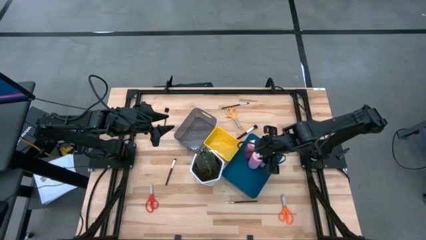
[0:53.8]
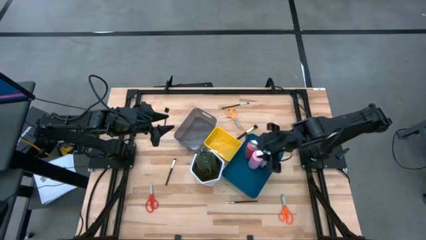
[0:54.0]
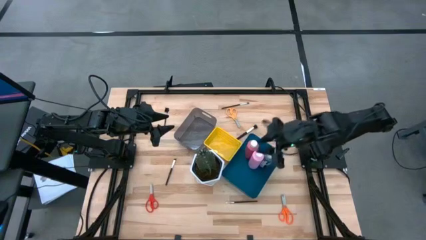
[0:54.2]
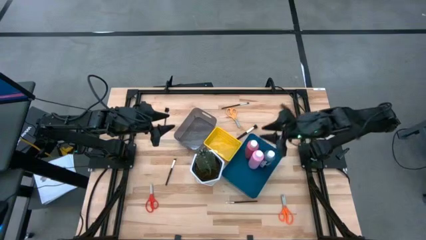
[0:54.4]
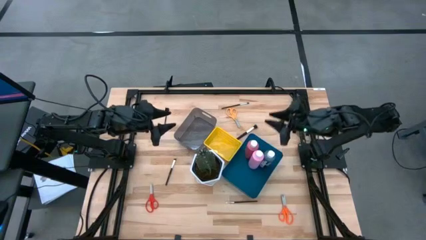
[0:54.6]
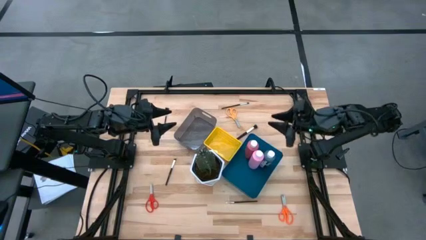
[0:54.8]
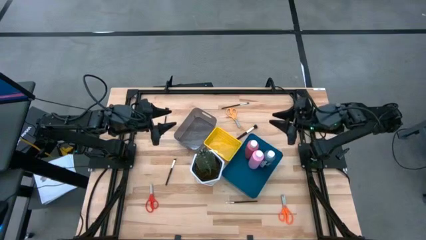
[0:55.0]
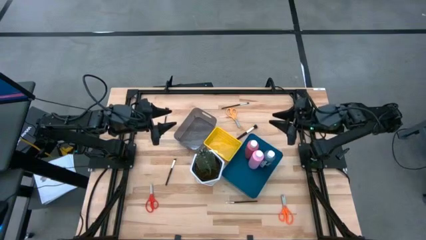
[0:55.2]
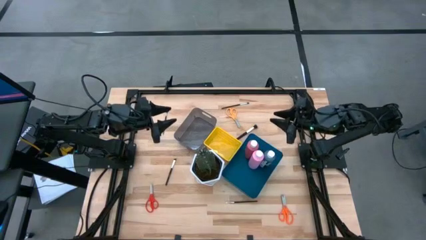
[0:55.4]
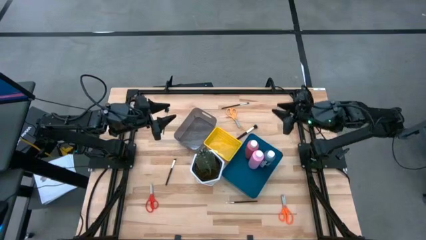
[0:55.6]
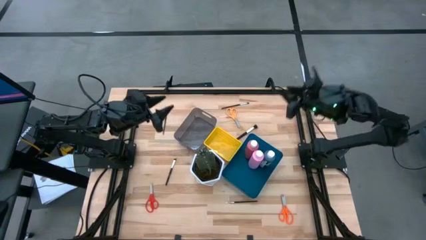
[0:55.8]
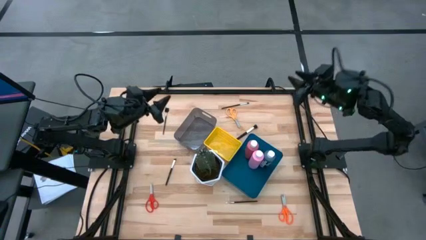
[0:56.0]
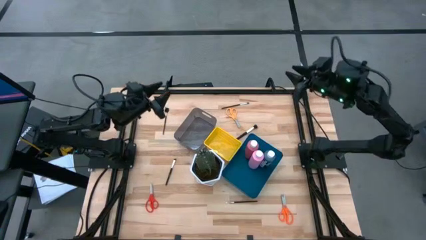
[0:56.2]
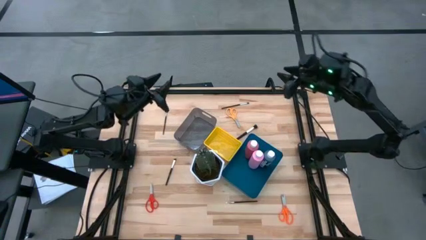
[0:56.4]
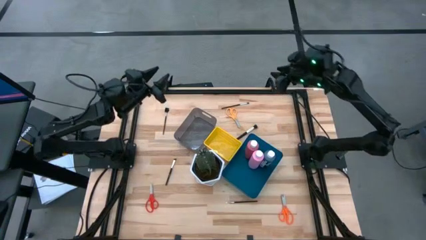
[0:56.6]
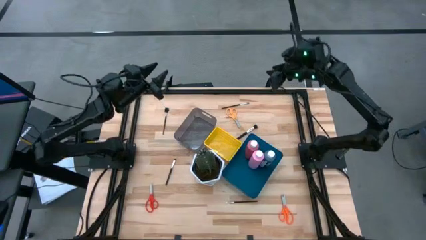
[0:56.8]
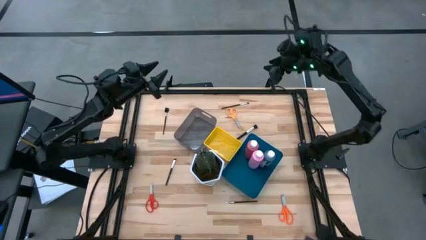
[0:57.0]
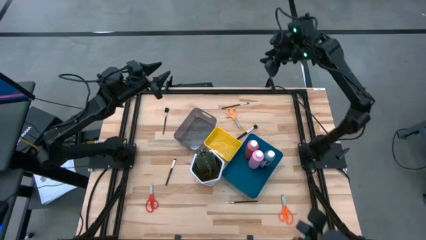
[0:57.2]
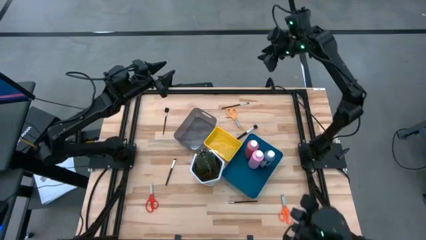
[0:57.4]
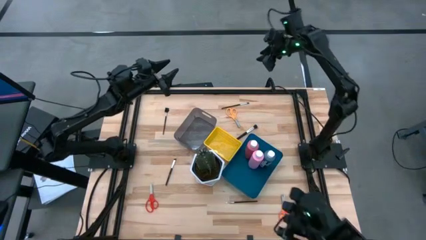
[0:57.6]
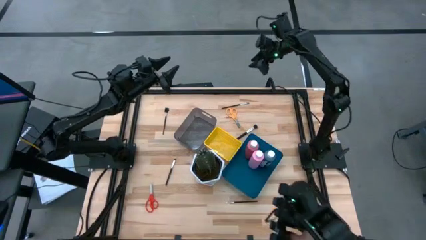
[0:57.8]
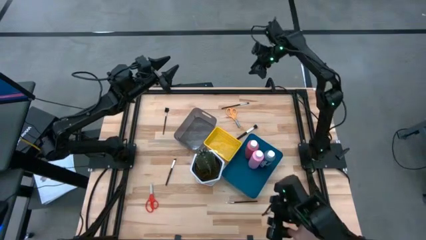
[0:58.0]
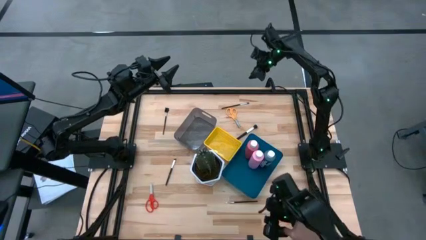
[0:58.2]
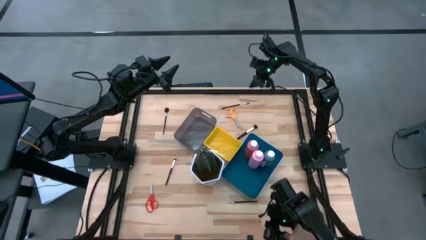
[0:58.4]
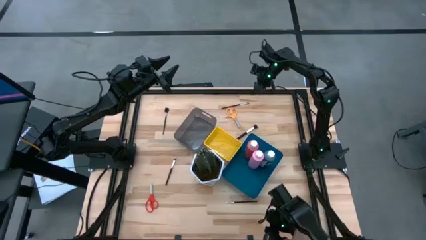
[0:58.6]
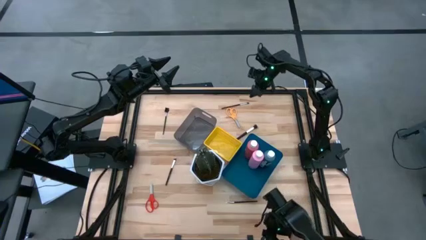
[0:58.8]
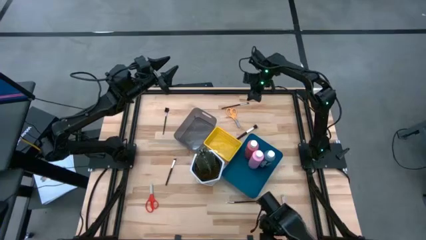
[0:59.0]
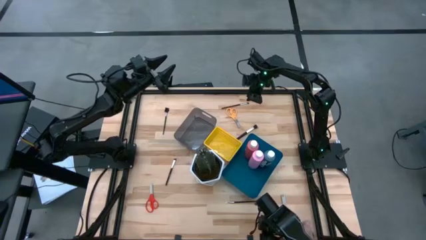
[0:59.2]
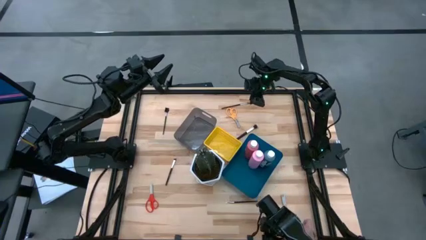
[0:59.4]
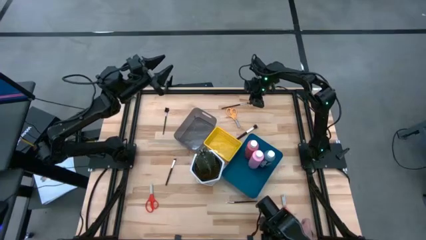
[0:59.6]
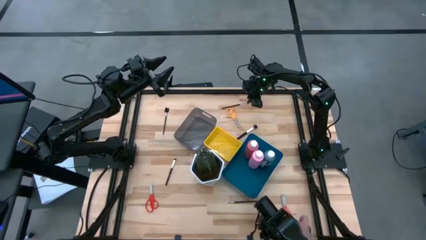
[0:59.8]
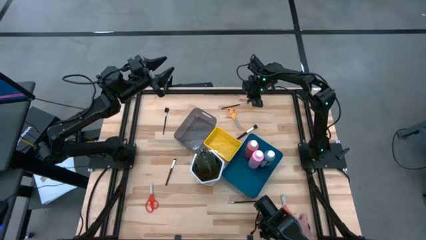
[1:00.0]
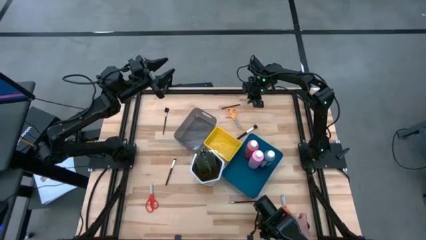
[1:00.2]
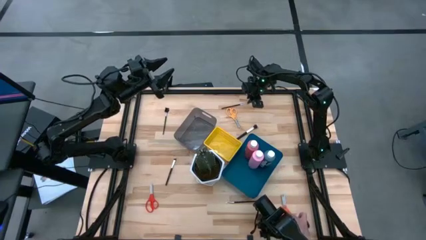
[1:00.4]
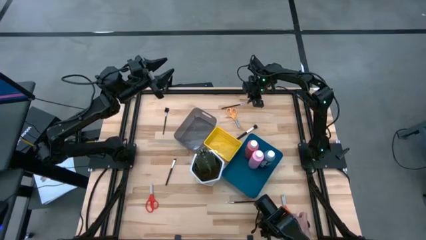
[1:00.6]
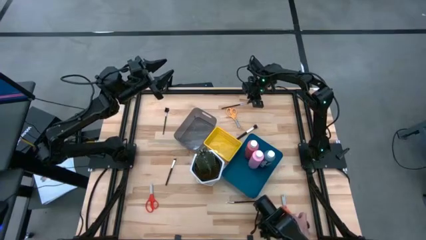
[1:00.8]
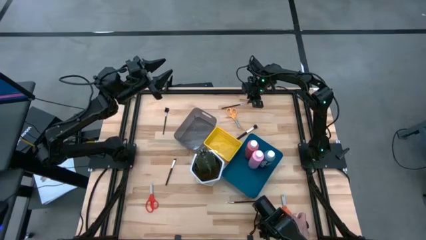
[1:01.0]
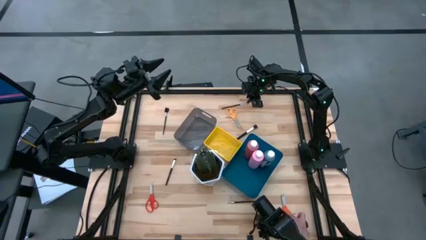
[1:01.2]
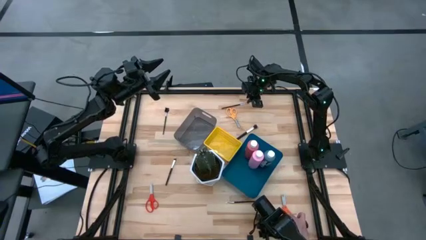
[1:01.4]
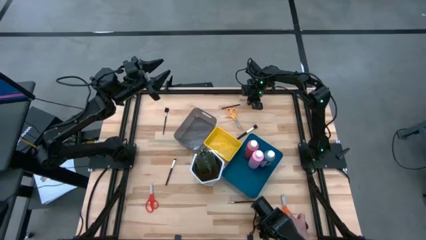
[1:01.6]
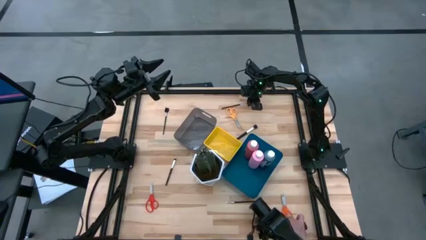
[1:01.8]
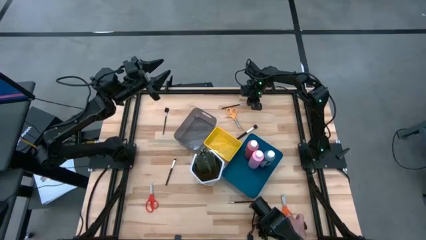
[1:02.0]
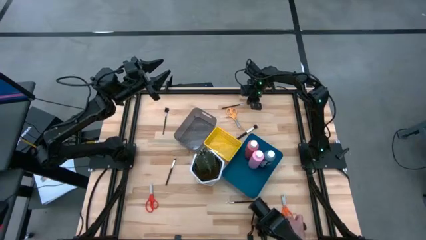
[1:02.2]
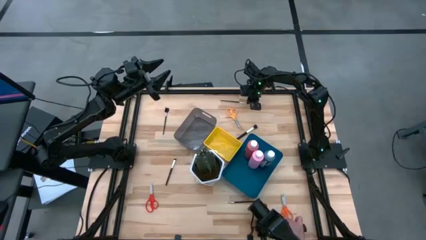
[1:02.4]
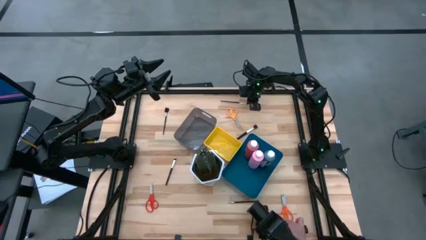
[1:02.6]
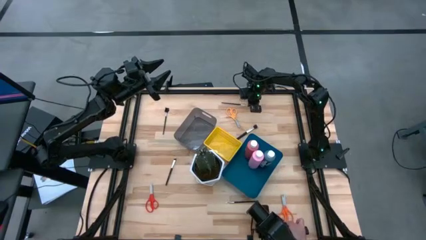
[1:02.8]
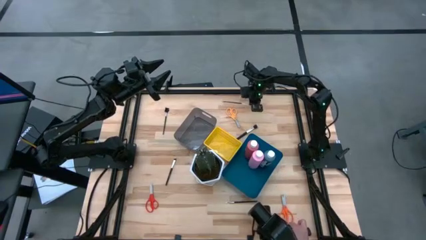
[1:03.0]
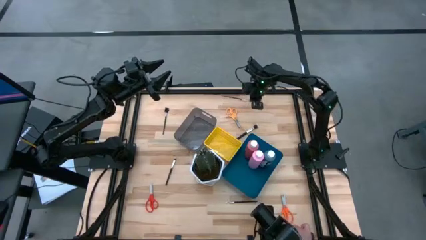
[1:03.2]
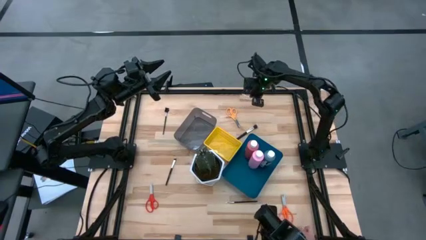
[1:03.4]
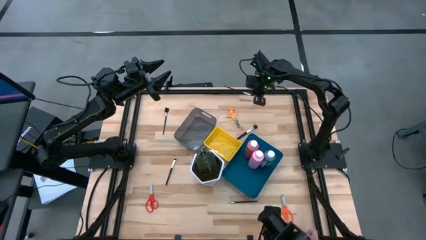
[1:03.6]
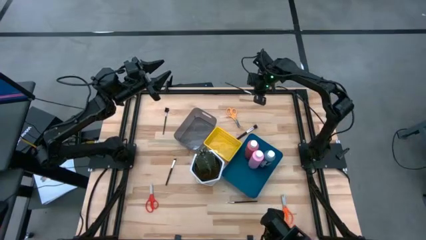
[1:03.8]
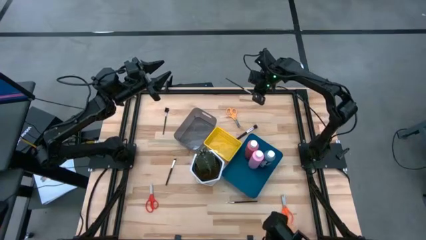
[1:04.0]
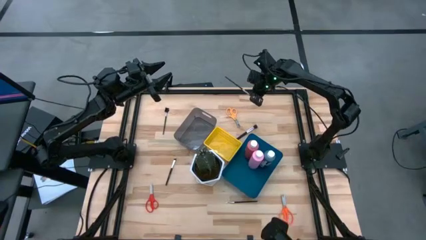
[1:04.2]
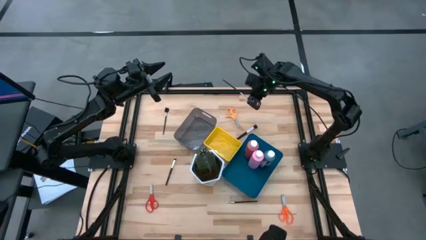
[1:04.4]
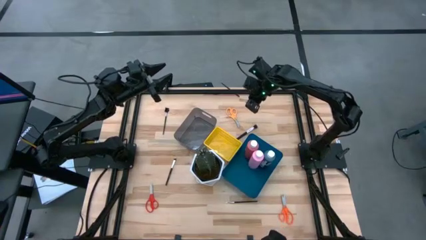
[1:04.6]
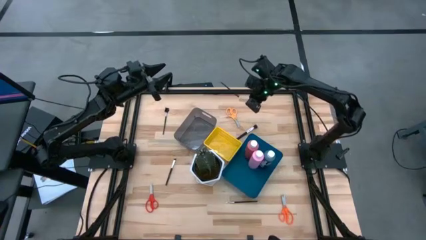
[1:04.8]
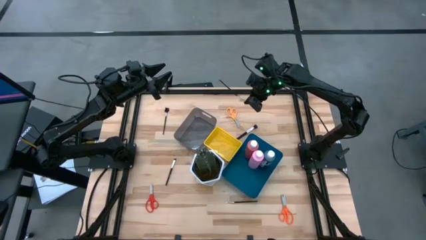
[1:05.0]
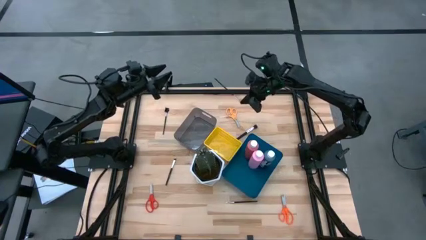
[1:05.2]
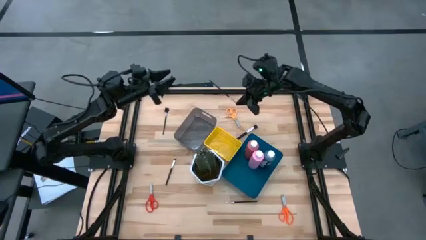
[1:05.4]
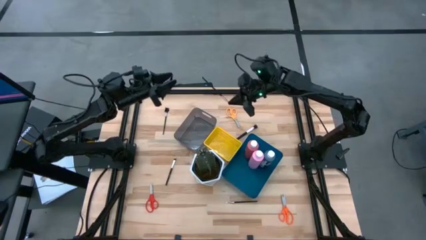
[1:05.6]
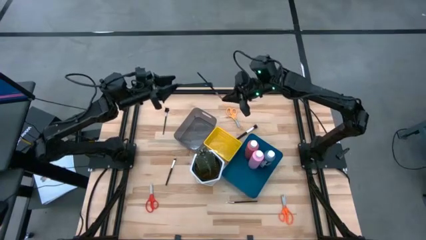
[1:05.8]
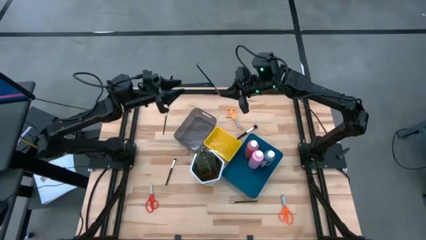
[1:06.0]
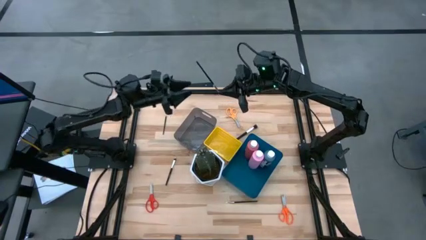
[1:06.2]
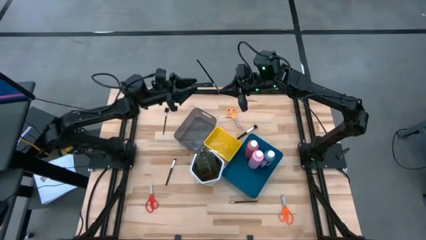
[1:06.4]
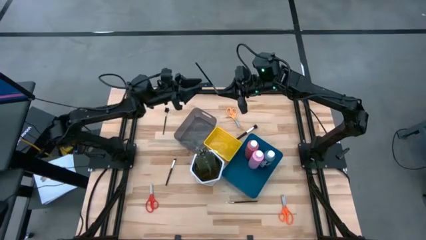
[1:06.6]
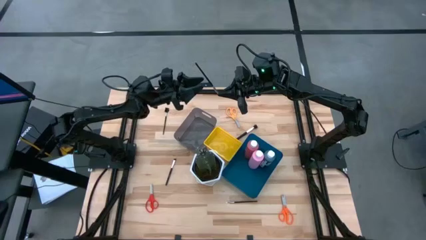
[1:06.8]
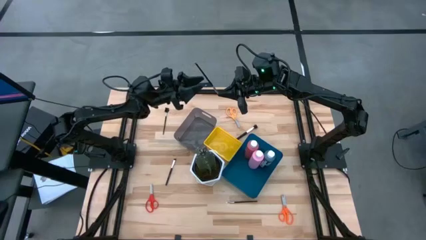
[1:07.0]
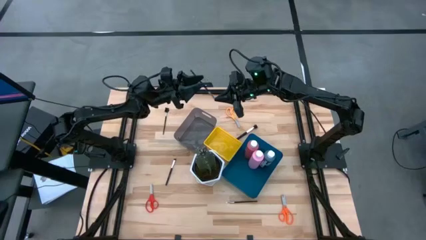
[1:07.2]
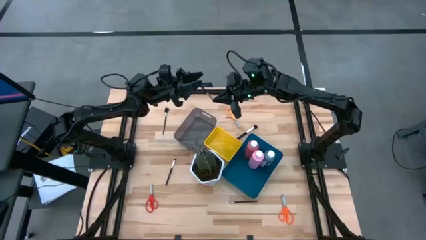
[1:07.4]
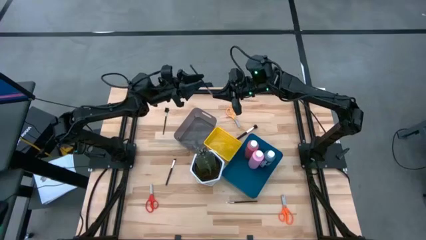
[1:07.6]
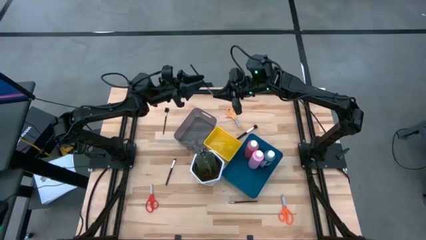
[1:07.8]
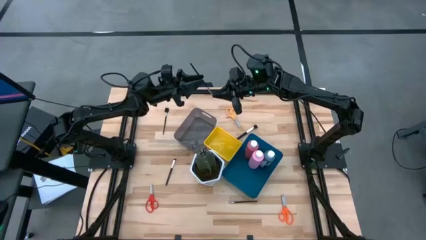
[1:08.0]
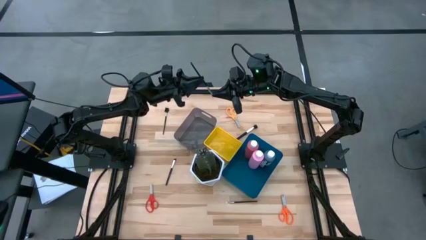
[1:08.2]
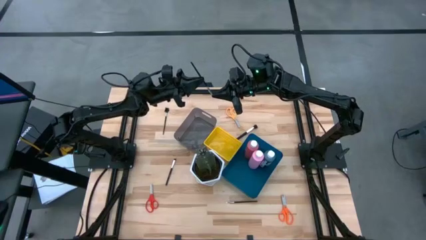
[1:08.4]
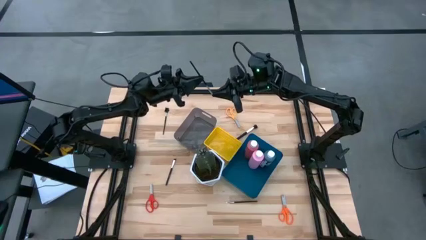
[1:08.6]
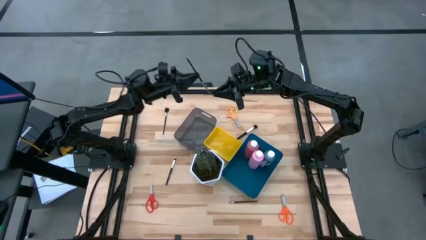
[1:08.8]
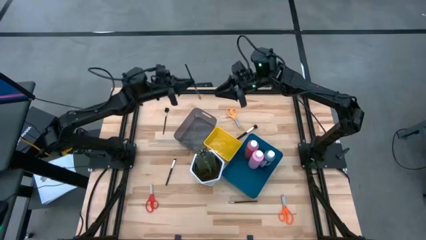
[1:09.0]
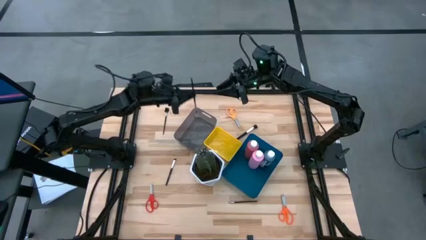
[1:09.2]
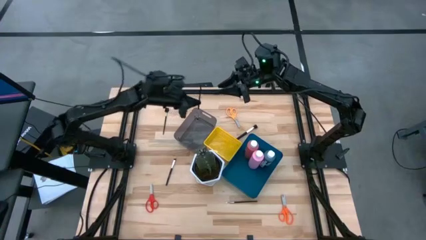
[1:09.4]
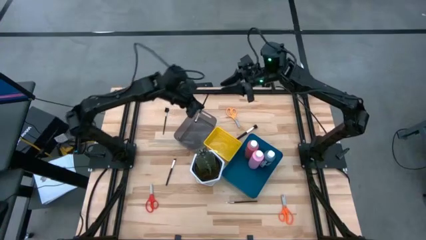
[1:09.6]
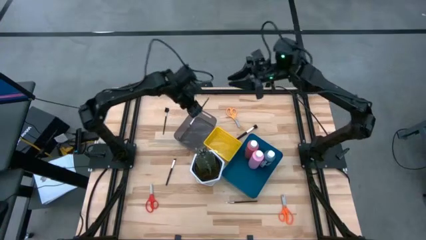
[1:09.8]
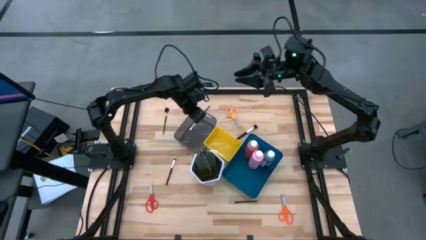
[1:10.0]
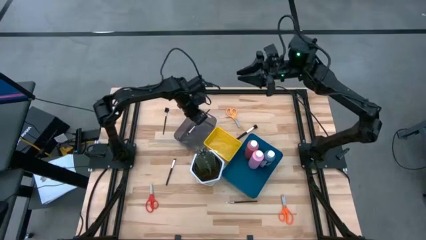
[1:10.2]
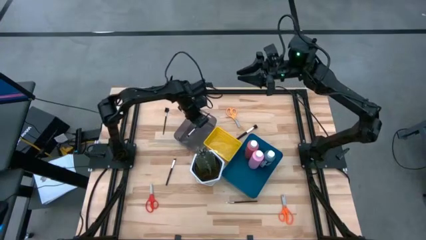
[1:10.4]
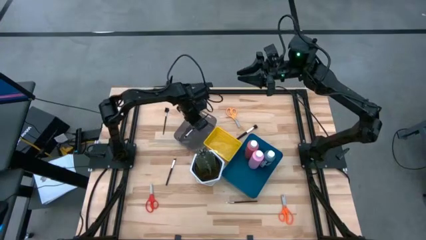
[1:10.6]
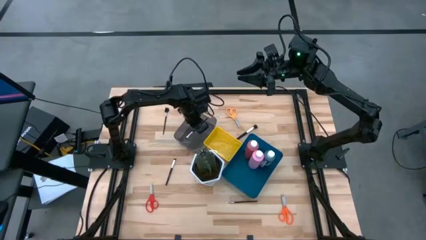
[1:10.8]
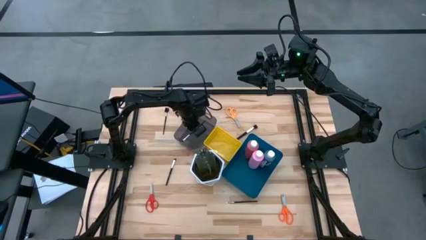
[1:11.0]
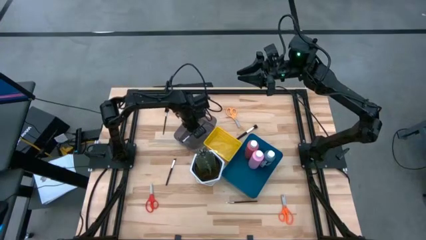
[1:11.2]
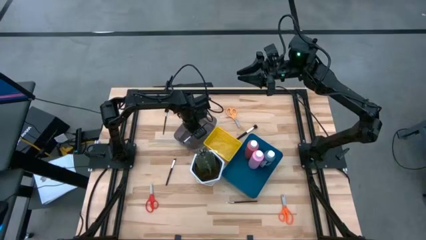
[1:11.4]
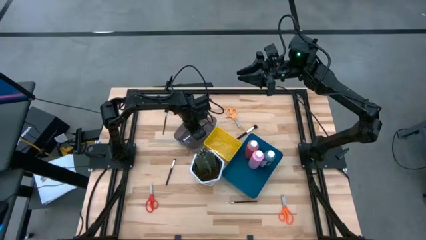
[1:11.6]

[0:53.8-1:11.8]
Task: Pick & Place Paint Supplies
Put the makeup brush into the black bin
